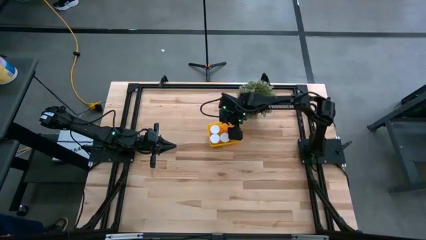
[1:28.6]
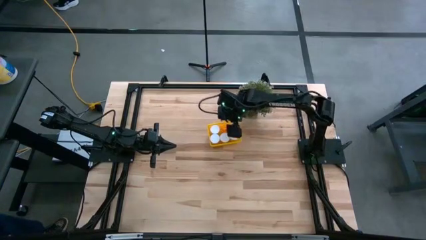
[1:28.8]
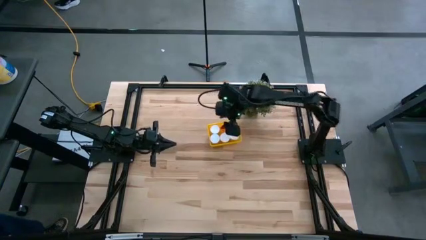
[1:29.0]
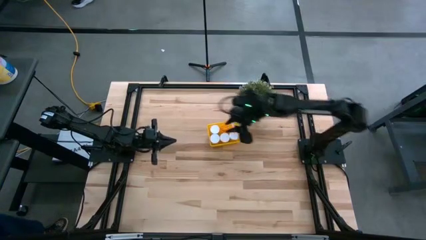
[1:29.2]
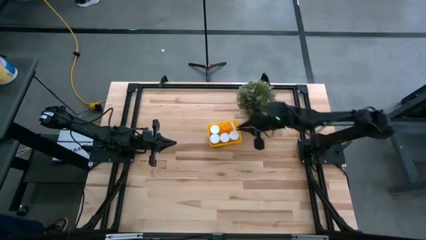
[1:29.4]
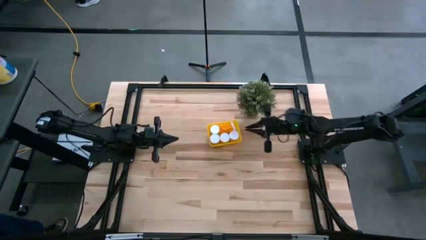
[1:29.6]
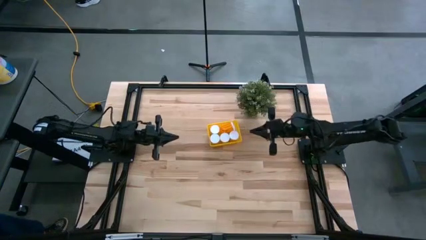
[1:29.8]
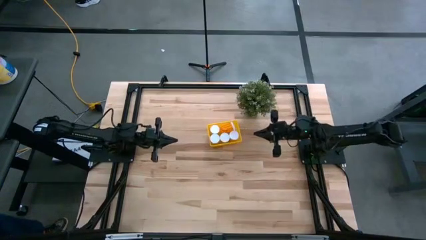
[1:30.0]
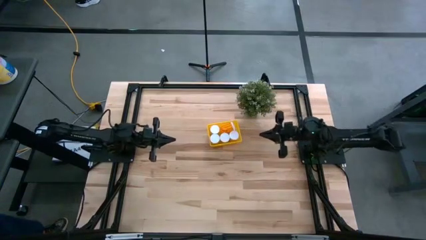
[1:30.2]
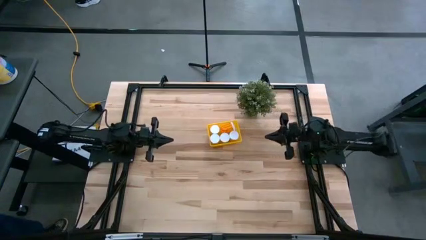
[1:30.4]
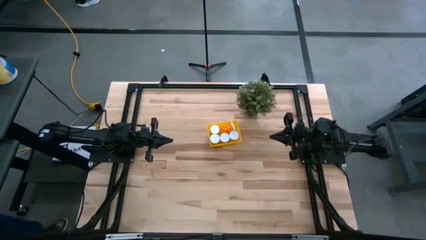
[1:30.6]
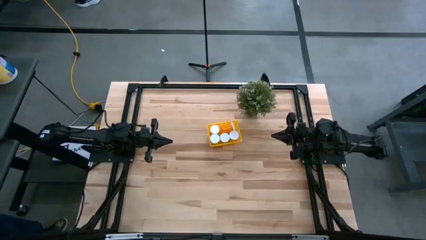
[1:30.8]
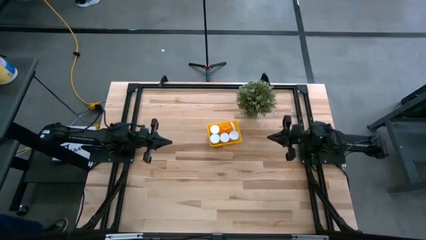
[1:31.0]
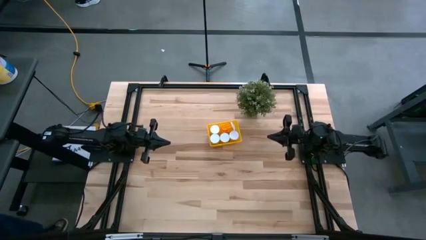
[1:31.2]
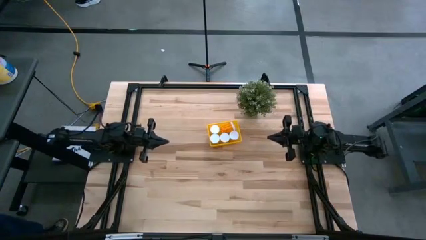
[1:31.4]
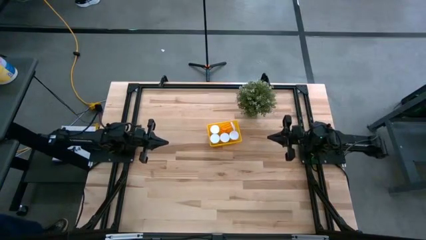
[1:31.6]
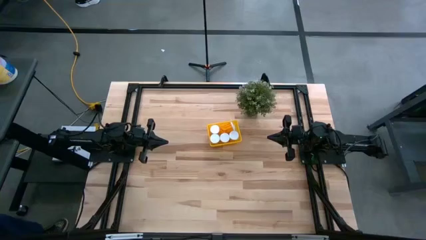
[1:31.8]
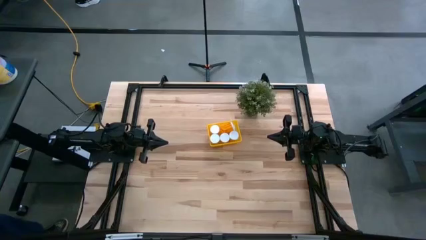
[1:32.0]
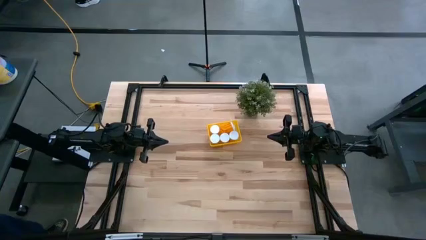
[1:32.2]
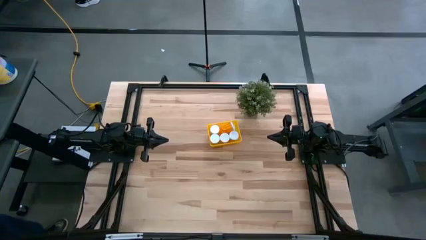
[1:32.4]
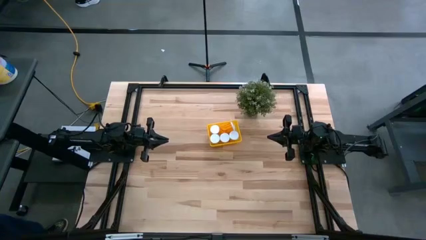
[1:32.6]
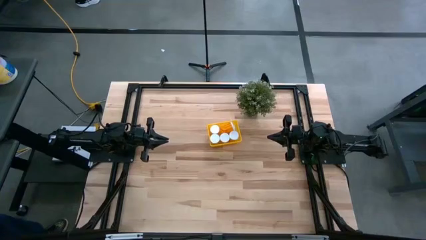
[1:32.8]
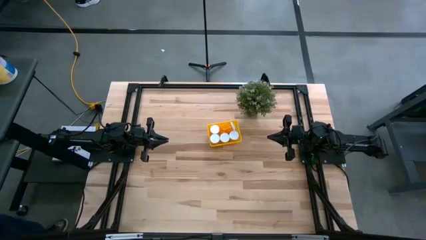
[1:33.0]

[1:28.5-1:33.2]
Task: Pick and place pill bottles into a basket
Return to Home Position

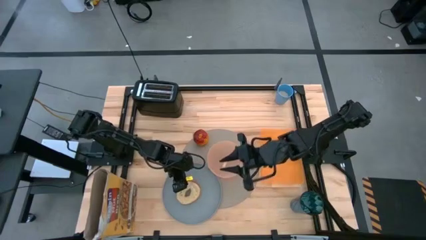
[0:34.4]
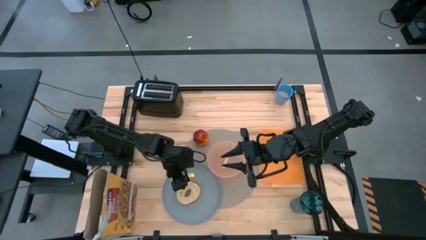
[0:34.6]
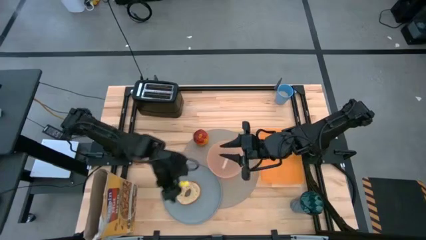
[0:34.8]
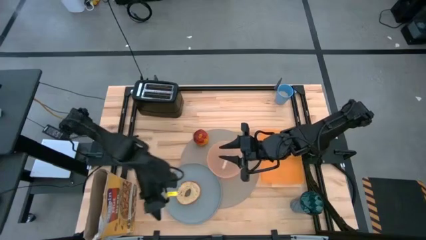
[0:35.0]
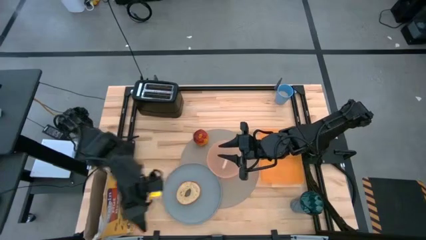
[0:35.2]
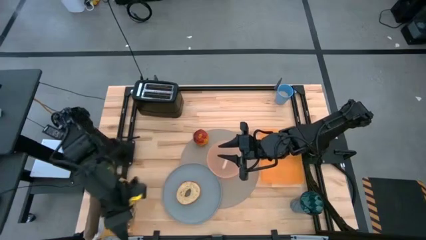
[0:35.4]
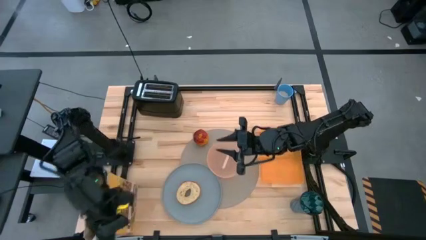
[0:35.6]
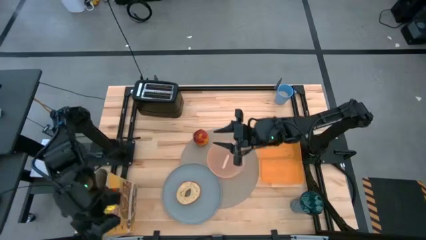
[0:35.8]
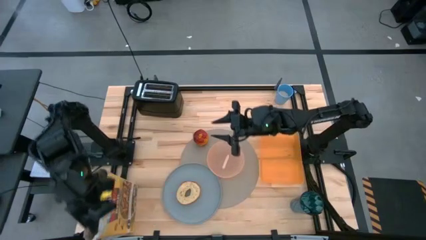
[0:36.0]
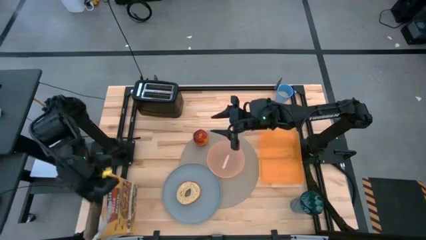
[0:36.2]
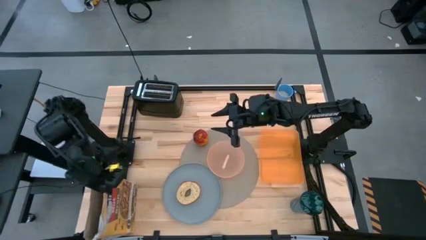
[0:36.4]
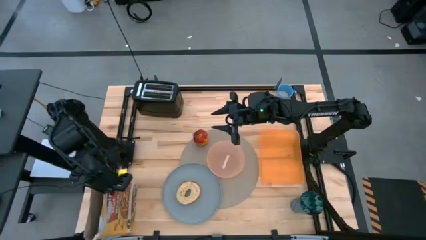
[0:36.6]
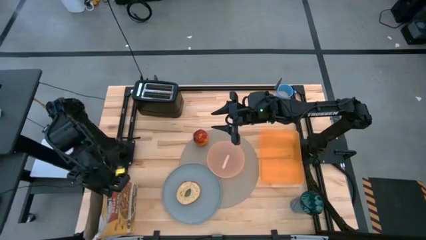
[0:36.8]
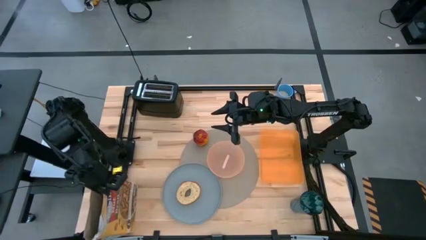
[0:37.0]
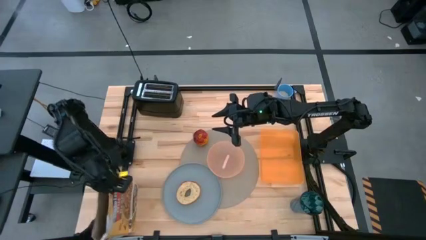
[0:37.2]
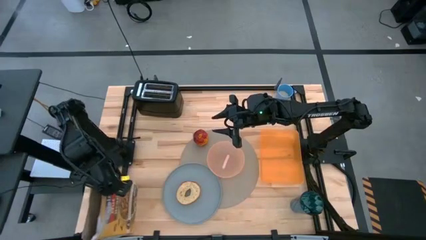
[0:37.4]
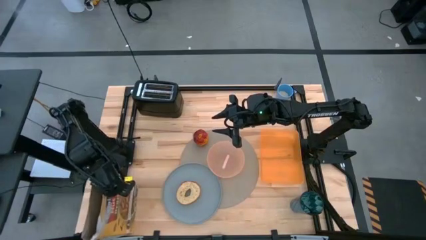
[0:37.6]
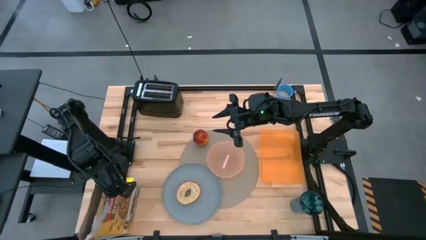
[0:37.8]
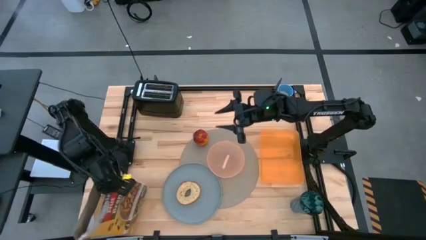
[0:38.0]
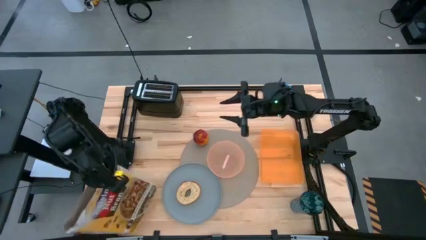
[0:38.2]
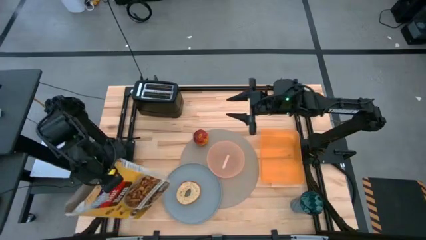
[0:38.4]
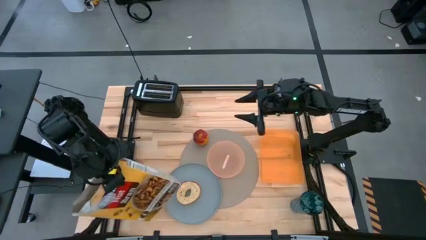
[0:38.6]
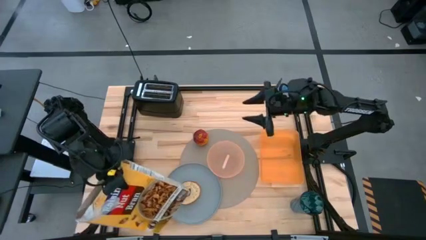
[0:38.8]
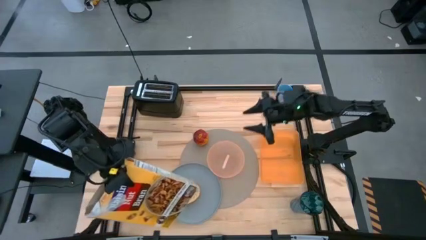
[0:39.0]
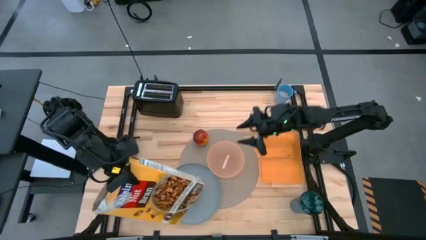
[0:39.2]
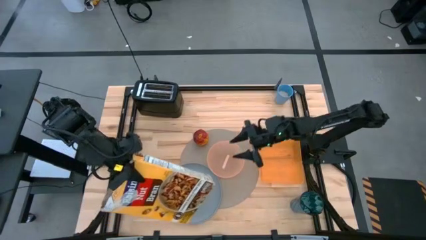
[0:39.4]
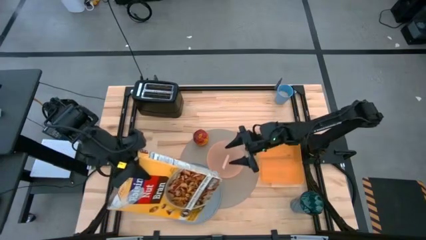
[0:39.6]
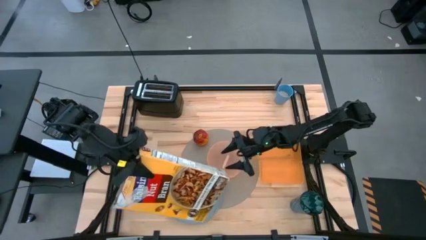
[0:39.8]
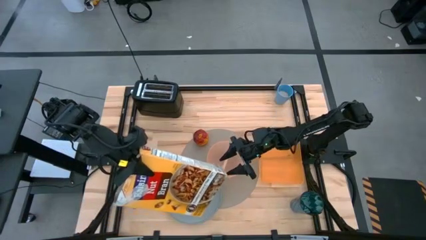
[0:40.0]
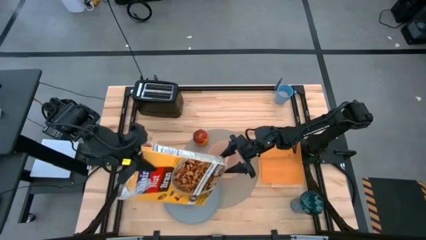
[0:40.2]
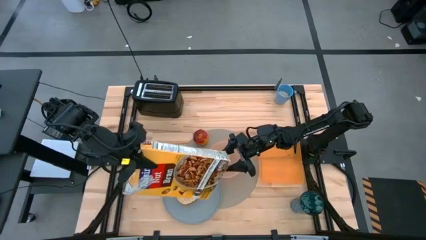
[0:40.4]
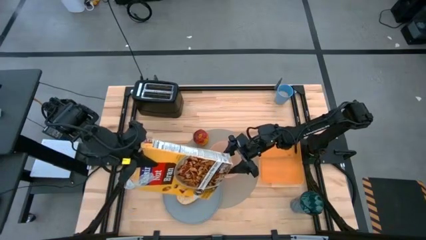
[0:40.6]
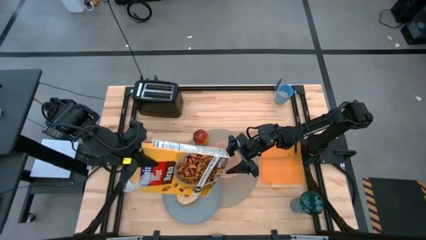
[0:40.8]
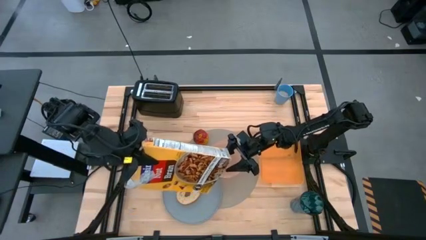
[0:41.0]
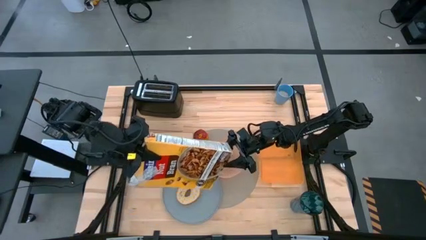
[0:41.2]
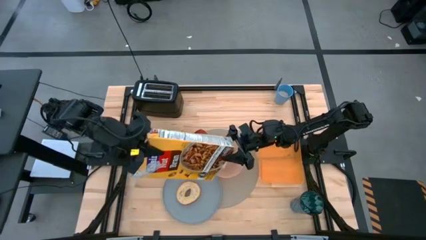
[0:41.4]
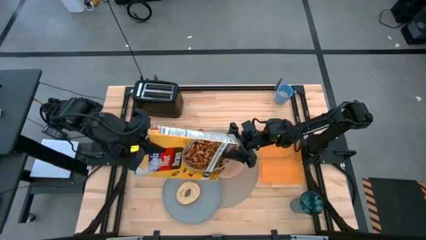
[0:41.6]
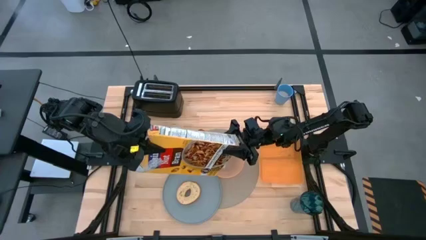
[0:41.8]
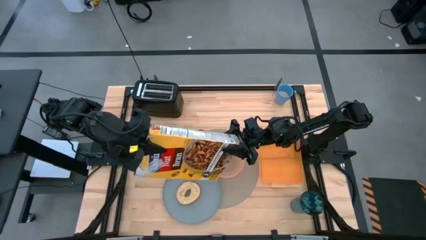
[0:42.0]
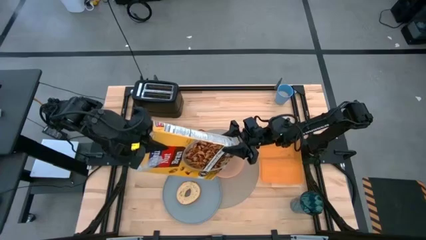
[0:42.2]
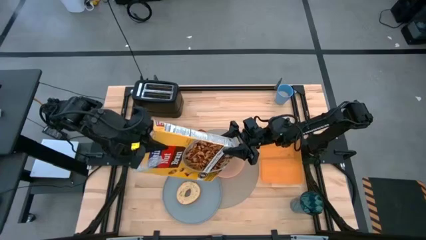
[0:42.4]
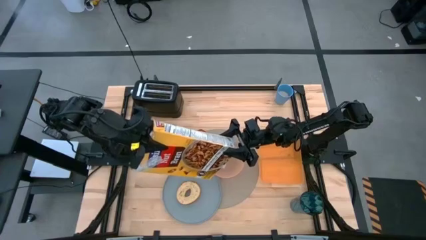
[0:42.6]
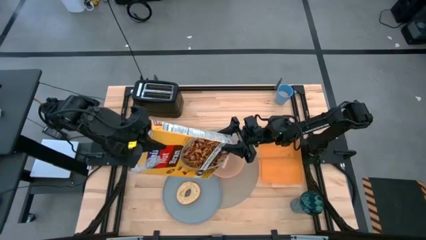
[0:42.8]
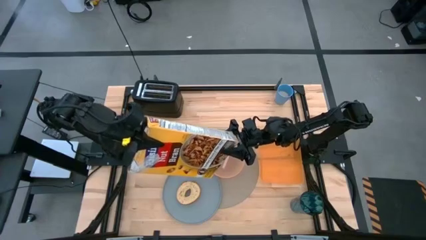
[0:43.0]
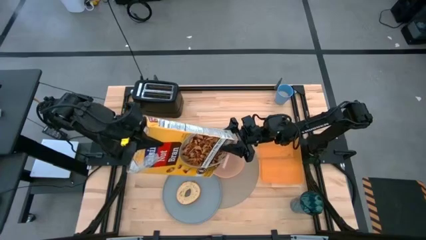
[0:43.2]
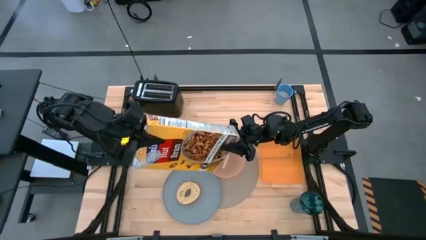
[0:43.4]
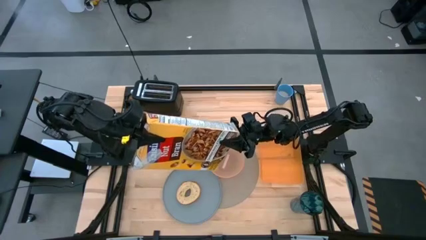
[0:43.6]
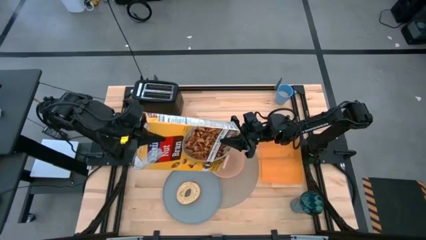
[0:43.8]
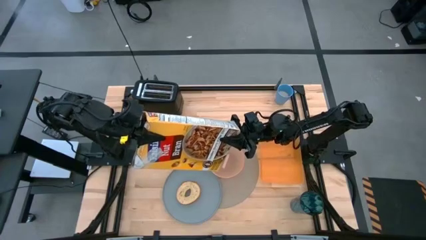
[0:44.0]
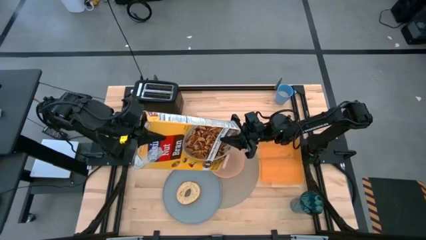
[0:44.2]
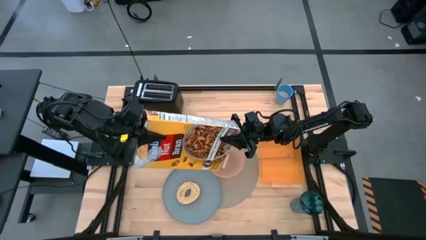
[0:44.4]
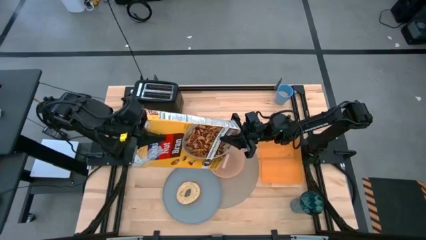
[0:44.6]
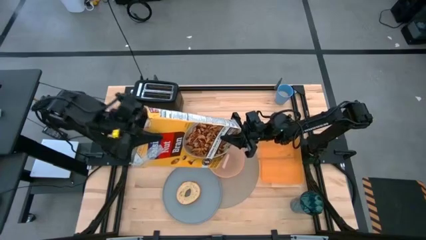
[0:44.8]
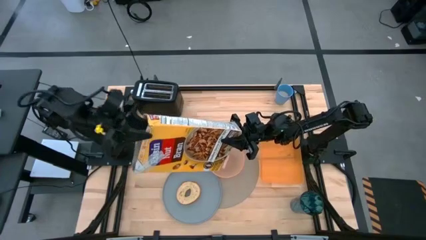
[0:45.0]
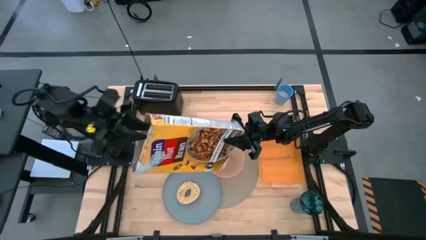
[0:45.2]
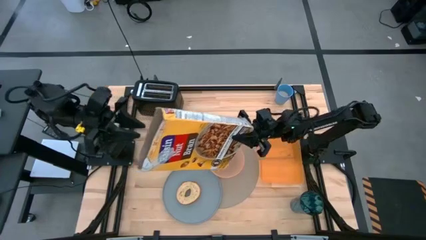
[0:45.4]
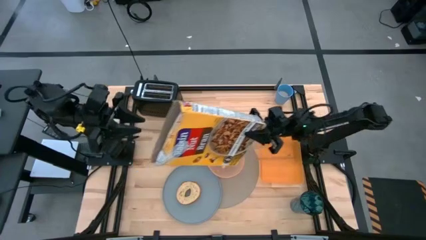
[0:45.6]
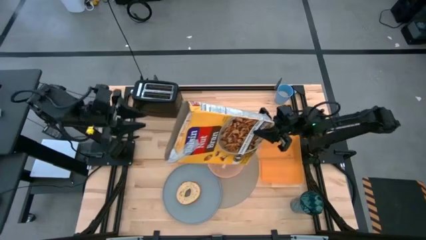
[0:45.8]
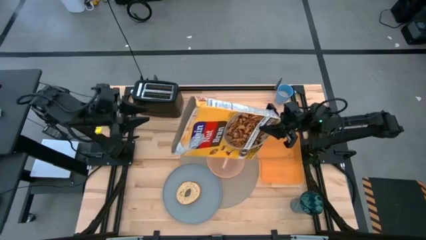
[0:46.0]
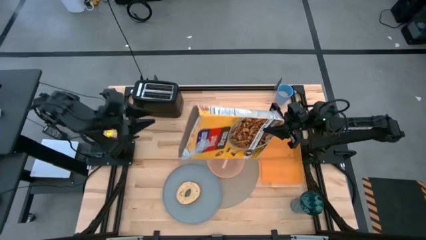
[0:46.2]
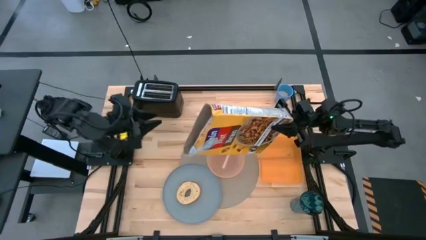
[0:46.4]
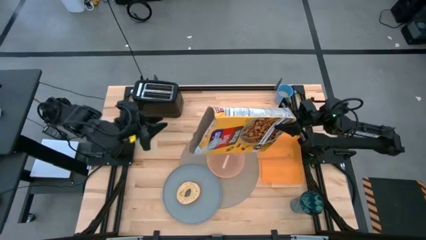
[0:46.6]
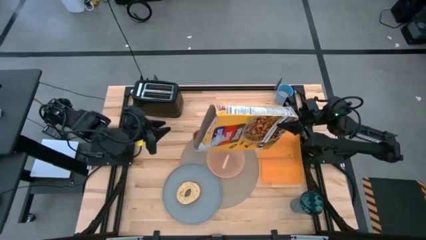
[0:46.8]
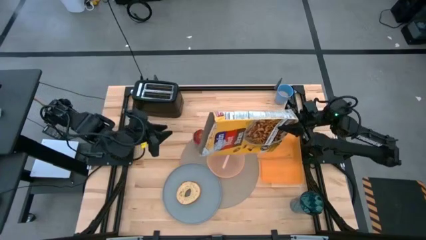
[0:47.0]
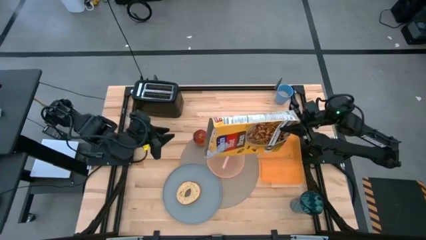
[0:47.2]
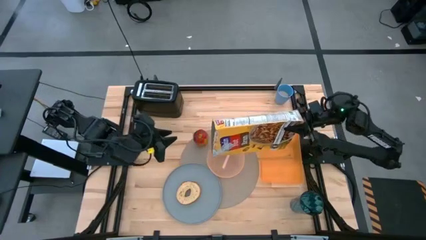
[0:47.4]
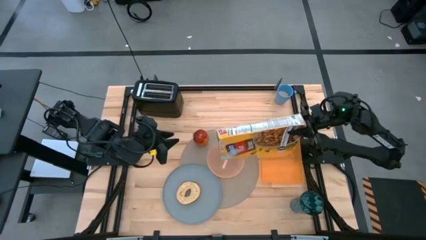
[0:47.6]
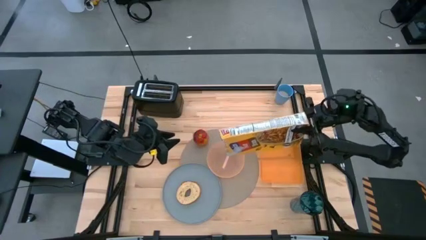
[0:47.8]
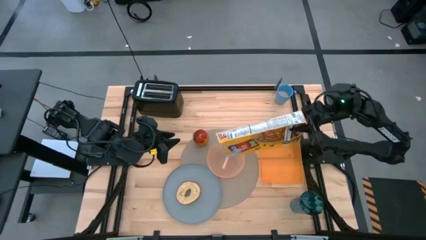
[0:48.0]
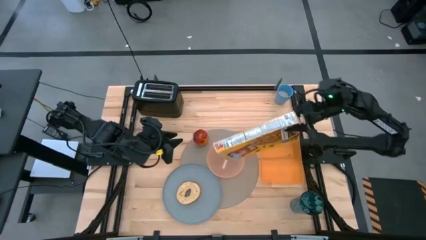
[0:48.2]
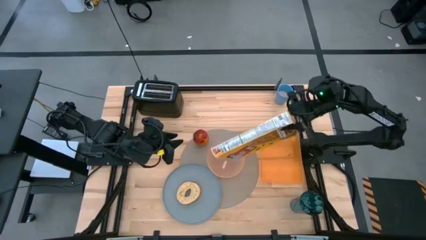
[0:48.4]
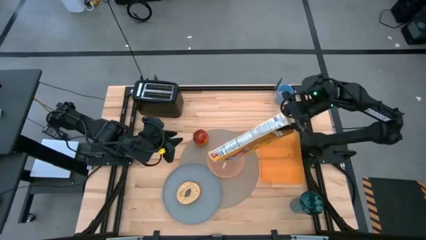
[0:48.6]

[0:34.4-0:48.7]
Task: Arrange a breakfast setting
Pour the cereal from the yellow cereal box into the light orange bowl
